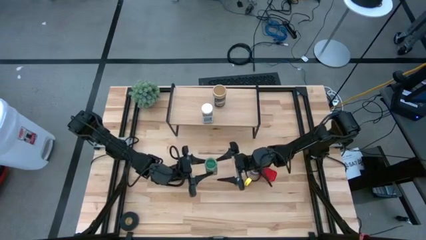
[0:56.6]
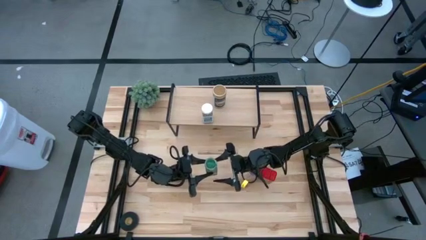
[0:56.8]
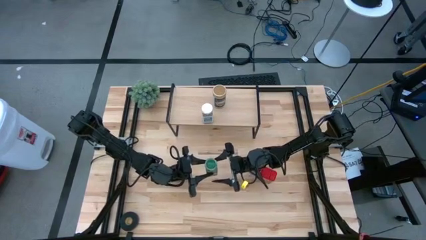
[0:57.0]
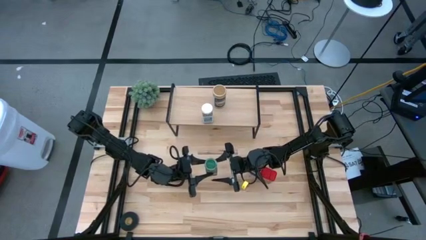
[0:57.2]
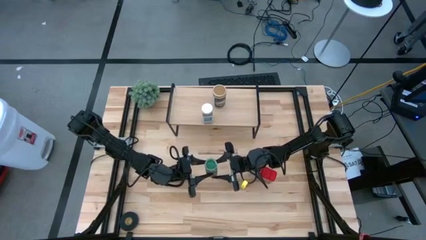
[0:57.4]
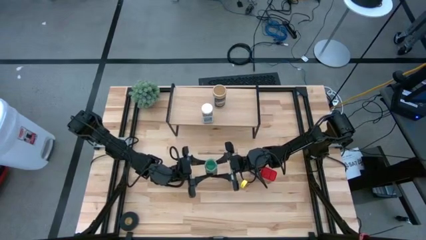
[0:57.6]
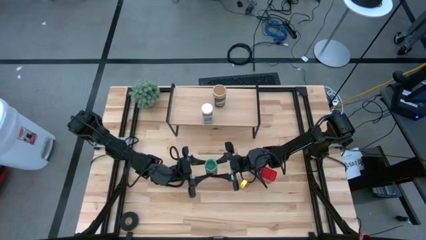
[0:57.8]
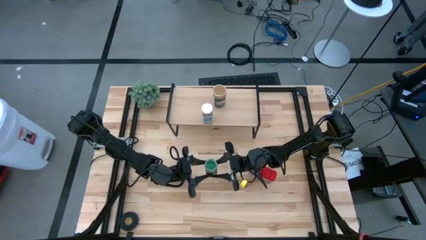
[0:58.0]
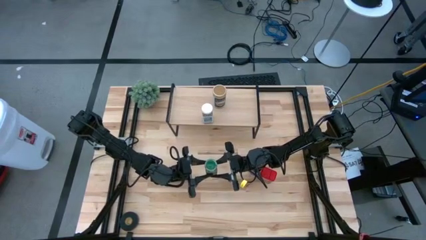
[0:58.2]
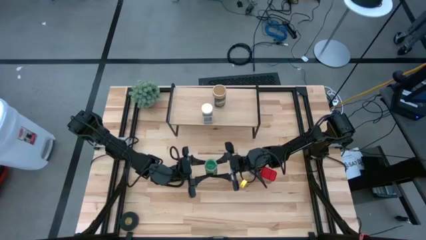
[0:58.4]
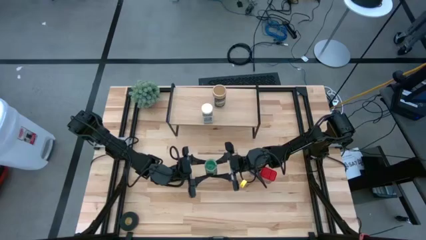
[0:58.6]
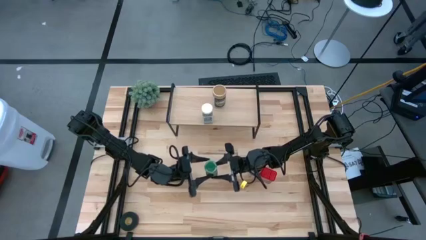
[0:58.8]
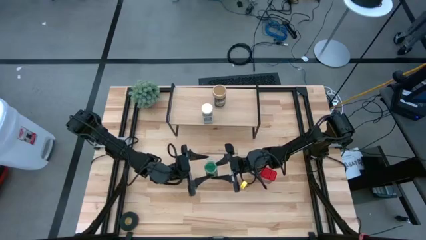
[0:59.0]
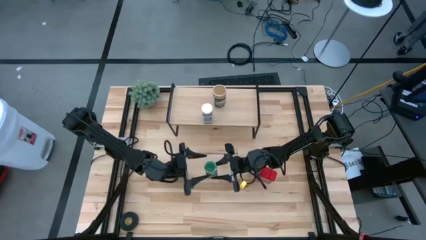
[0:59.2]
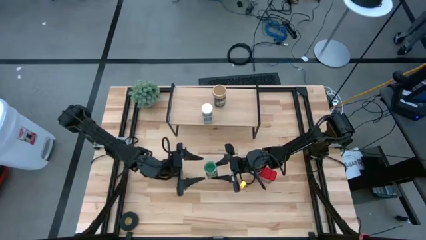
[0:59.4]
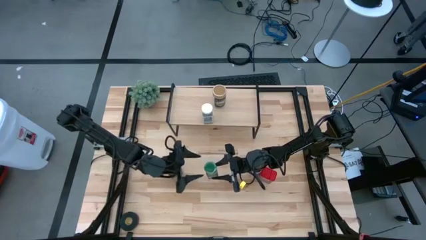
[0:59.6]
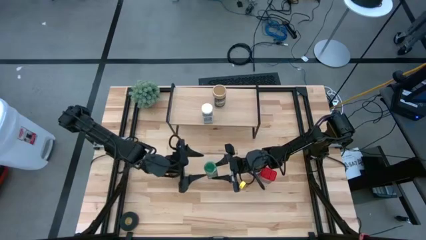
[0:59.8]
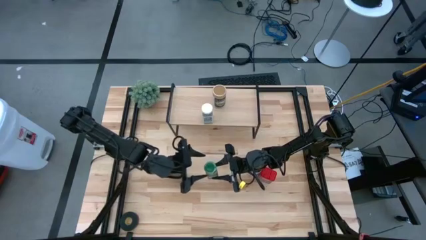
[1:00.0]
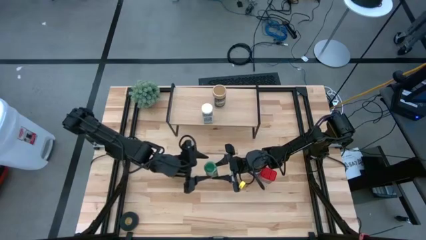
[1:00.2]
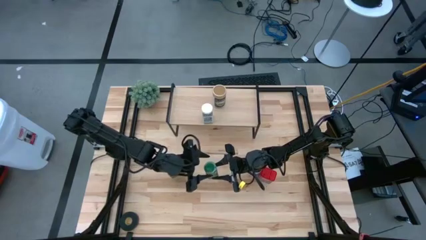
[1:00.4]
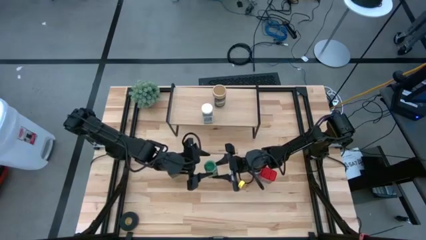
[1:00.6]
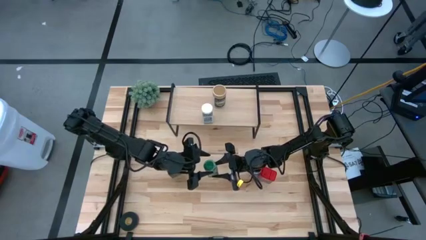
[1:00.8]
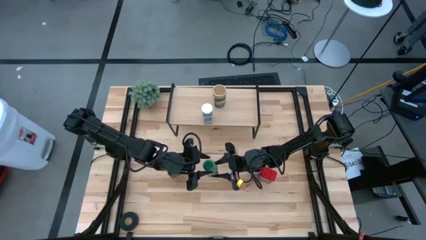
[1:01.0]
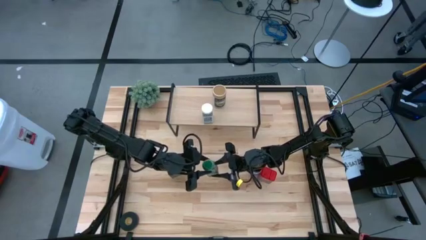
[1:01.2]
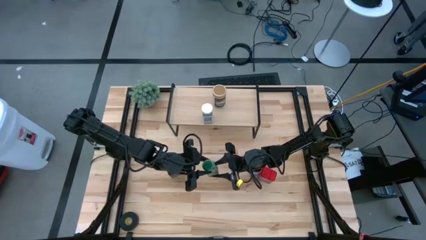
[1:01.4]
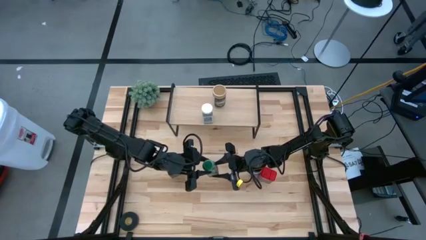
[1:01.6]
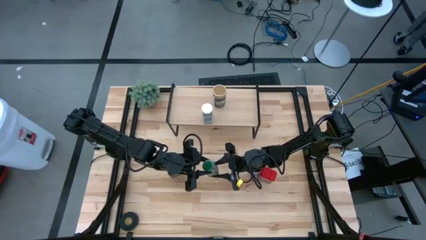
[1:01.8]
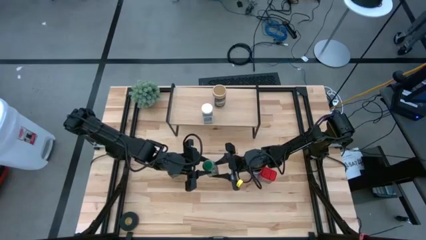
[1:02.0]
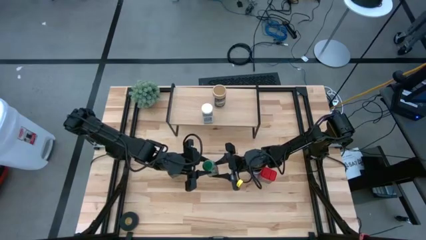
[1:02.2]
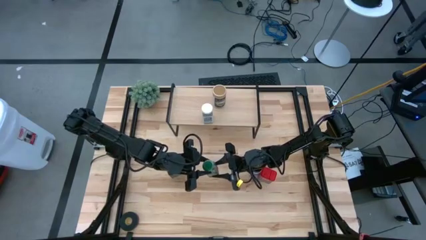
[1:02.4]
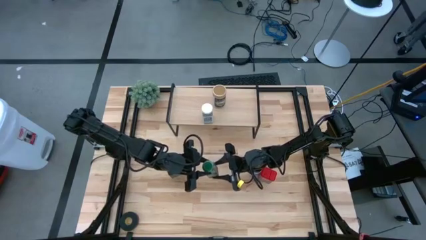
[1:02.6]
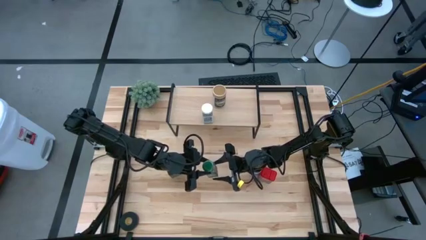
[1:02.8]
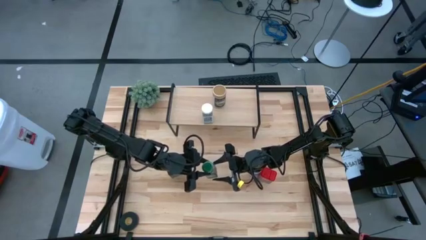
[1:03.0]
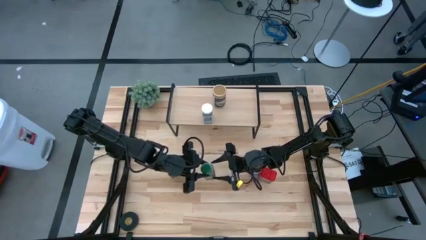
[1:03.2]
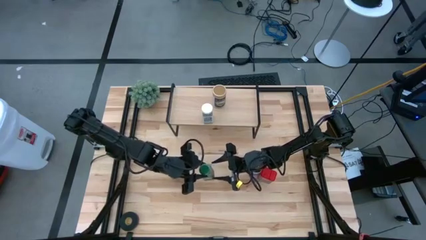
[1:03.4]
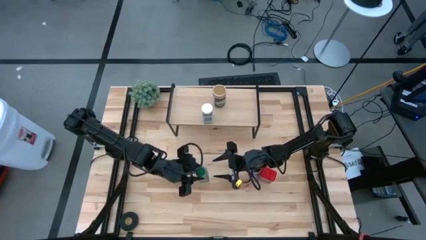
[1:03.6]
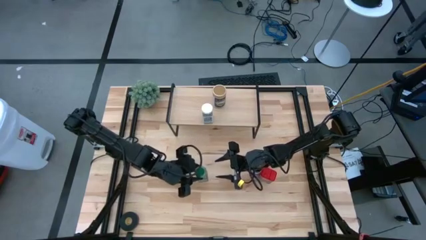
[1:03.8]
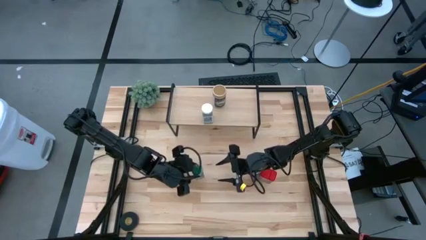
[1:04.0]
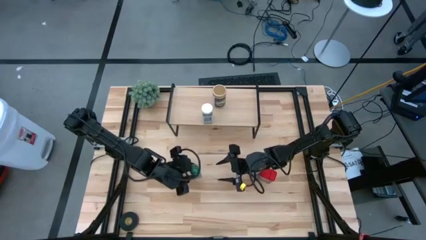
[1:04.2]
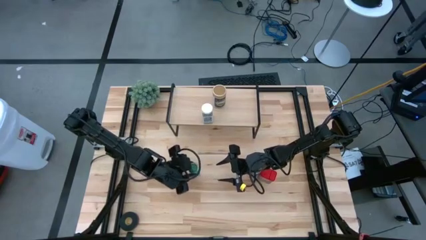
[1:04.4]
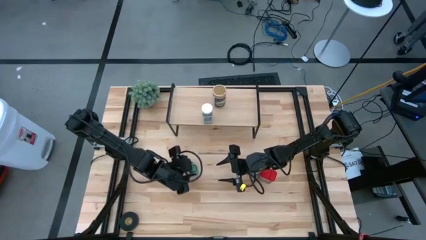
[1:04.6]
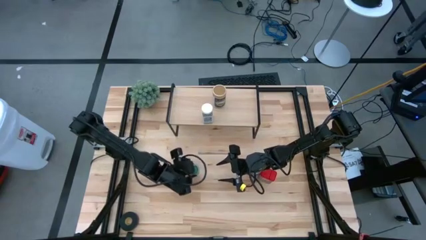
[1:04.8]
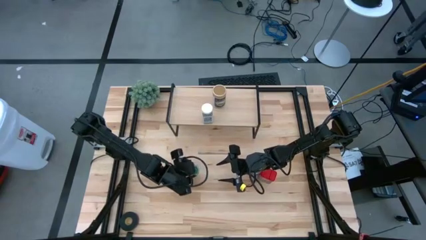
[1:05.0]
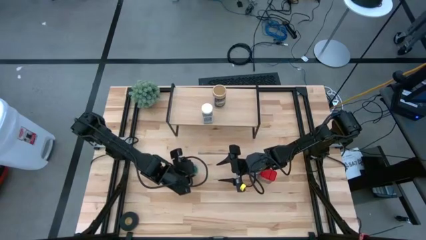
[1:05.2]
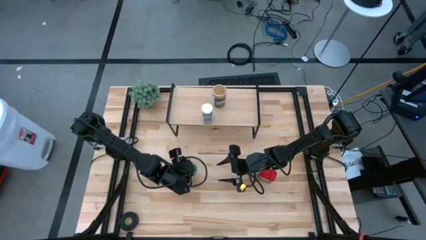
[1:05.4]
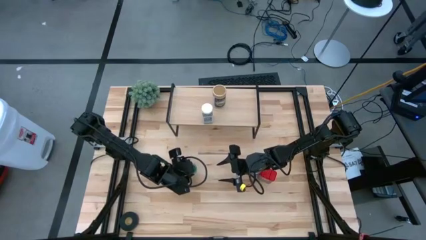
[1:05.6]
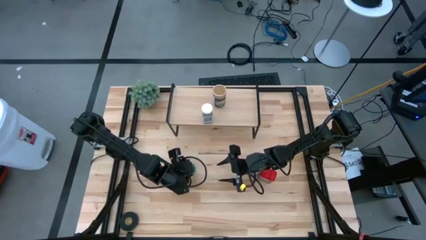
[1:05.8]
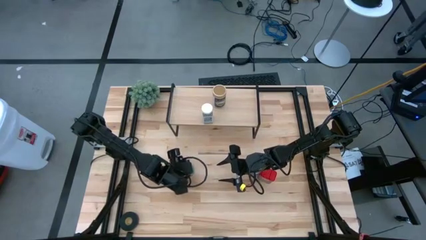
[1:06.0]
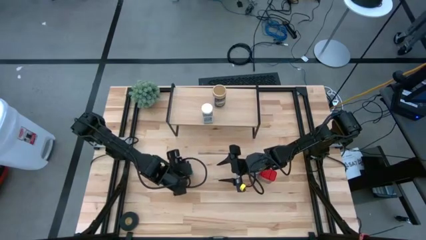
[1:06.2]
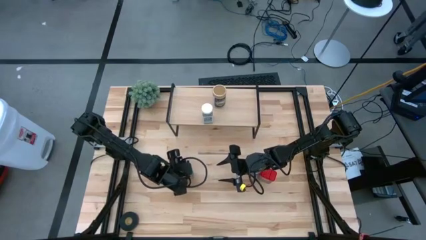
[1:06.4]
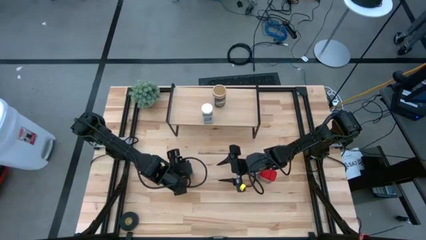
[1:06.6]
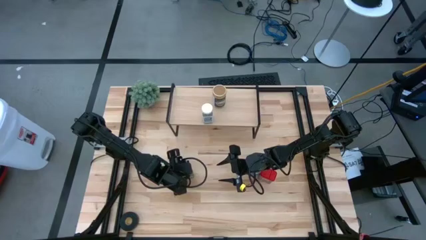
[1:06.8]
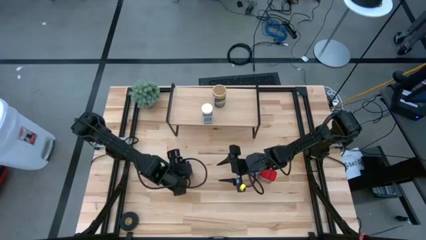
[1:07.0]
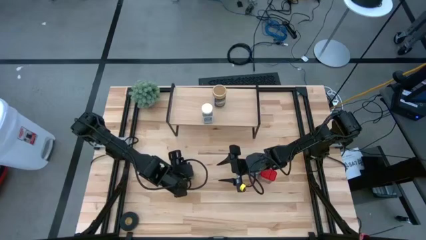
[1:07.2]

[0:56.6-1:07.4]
Task: Shelf spices
Remove the green seasoning bottle from the shelf

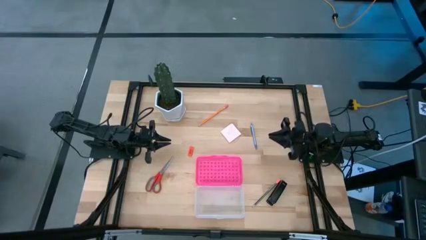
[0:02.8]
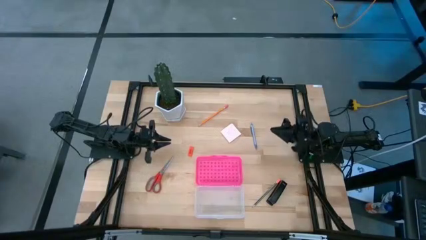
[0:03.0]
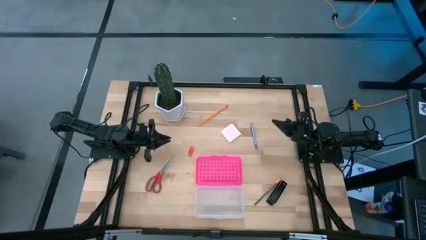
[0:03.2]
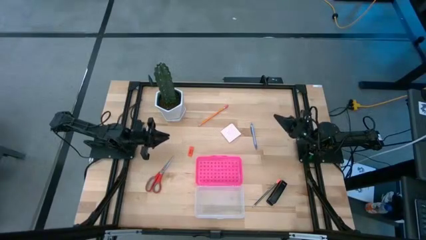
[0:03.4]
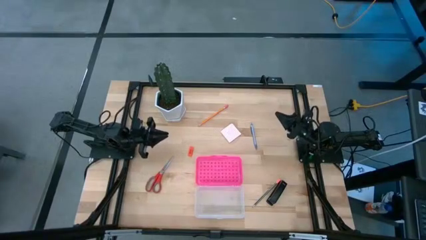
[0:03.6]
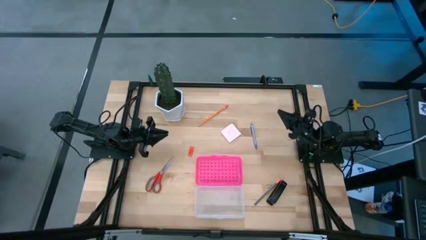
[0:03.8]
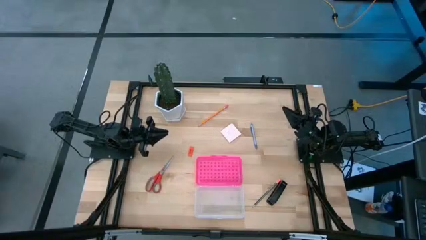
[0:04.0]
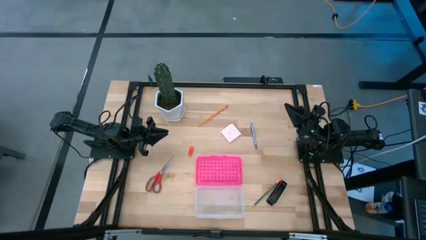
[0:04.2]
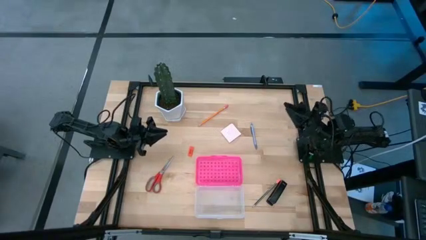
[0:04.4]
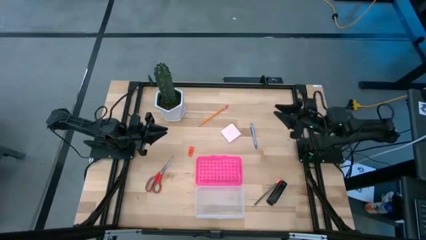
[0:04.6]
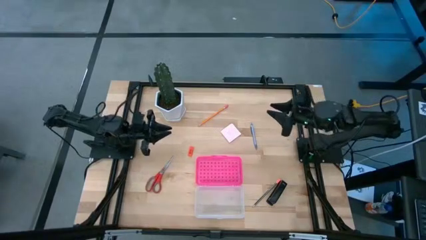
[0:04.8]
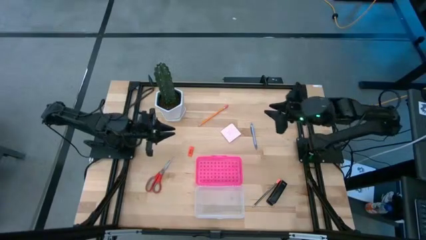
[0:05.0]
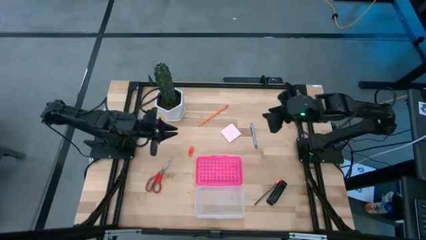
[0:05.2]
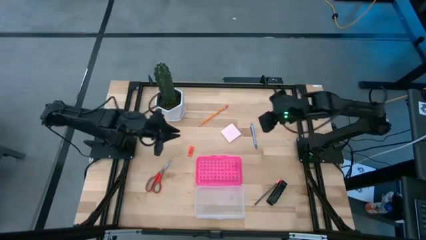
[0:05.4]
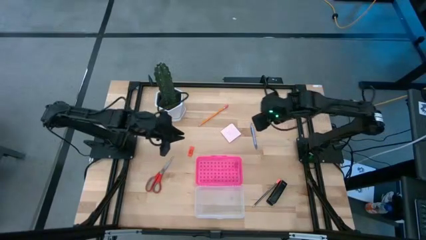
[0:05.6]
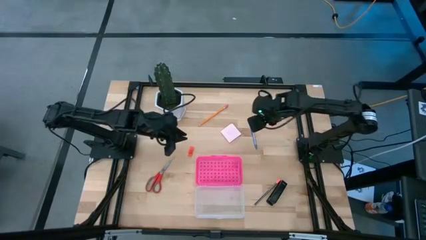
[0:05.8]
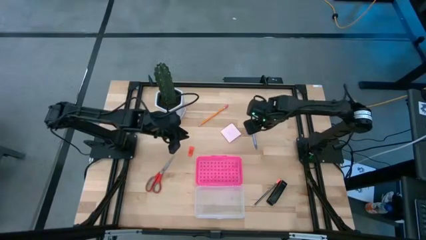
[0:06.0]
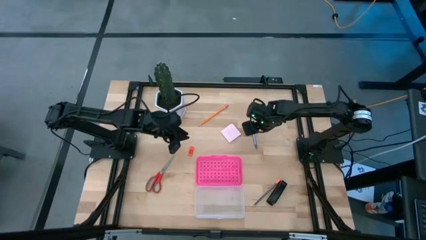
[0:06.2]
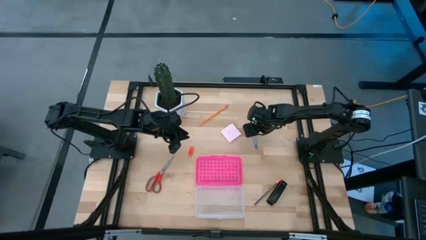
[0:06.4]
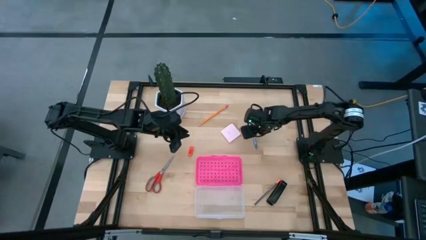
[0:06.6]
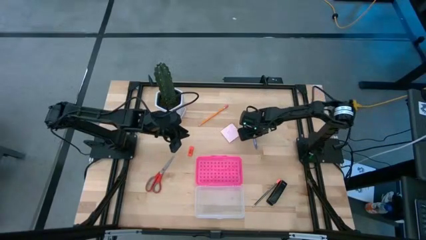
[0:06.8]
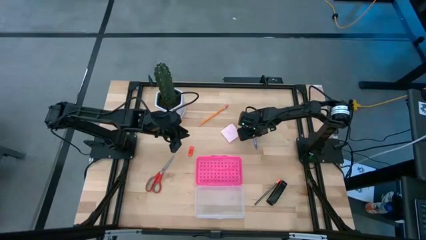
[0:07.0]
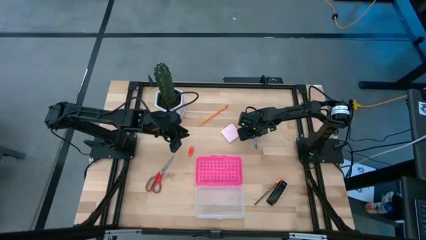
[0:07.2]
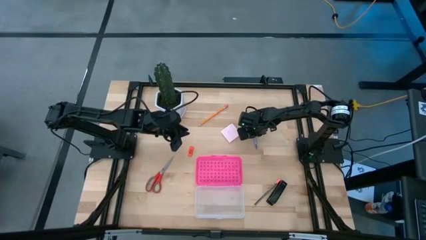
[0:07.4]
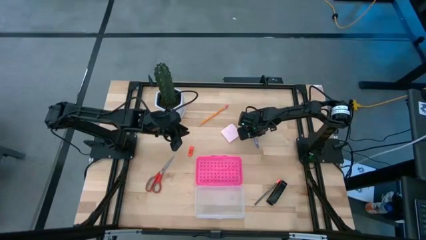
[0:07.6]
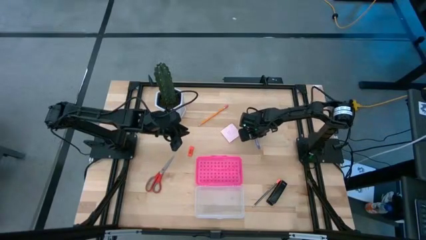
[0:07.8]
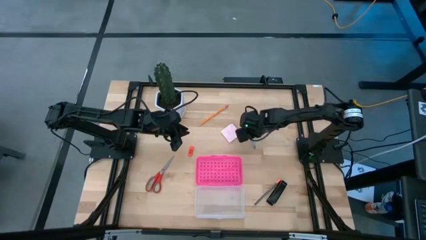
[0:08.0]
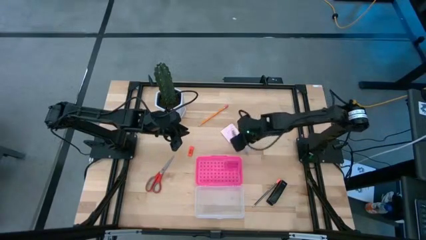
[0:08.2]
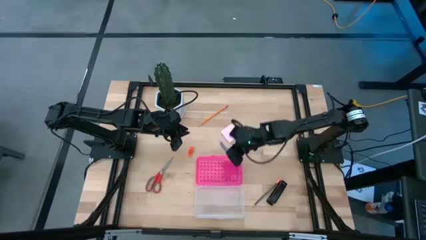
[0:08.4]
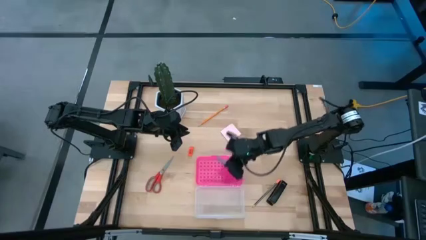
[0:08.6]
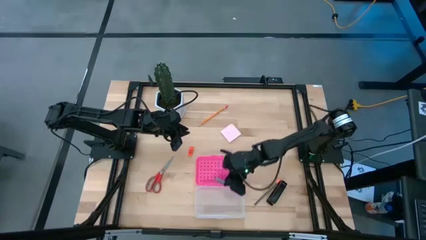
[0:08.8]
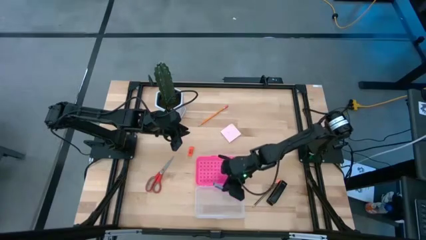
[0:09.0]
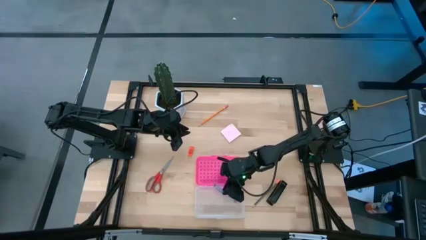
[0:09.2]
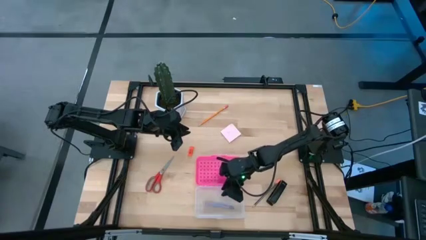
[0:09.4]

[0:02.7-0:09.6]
Task: Pack school essentials
Put the violet pen into the pencil case
